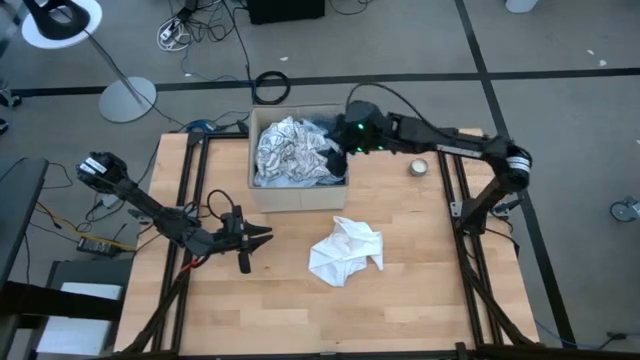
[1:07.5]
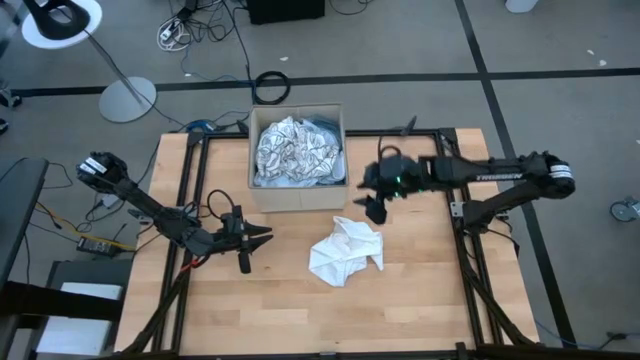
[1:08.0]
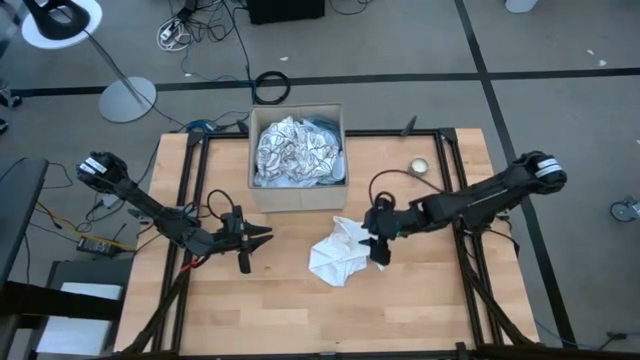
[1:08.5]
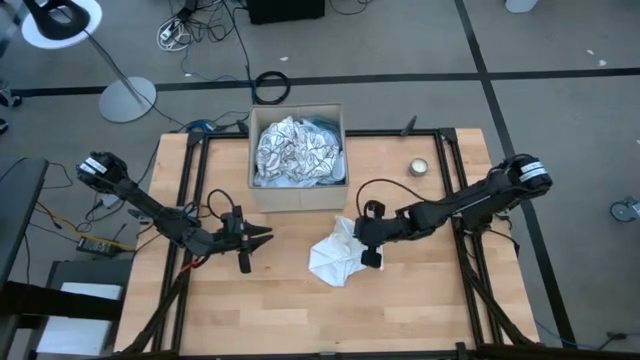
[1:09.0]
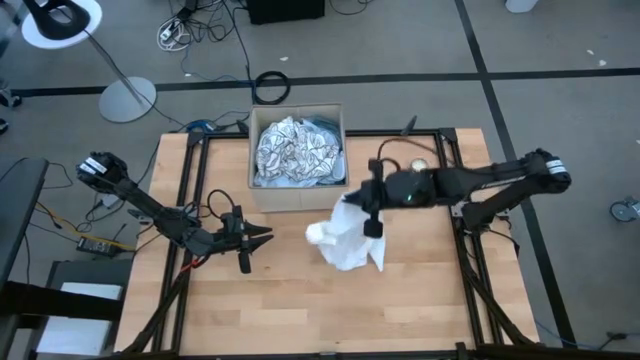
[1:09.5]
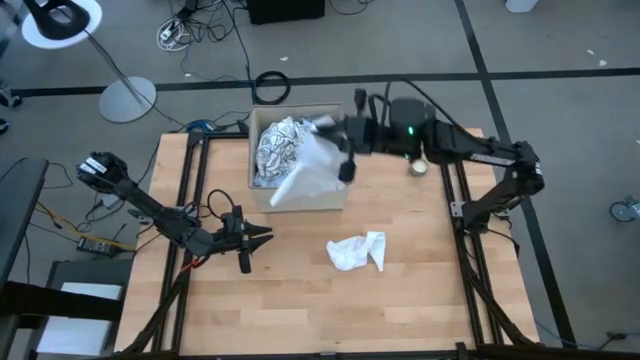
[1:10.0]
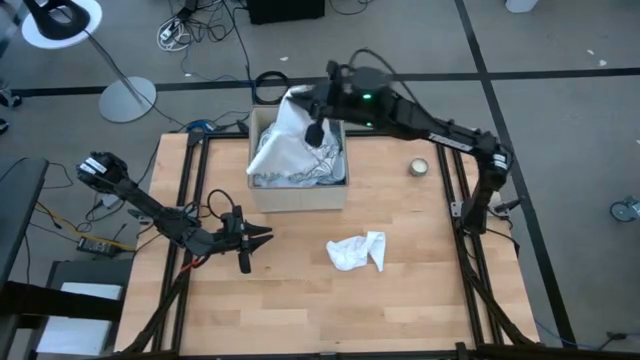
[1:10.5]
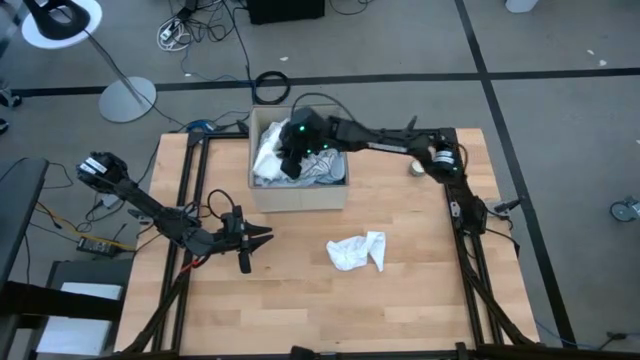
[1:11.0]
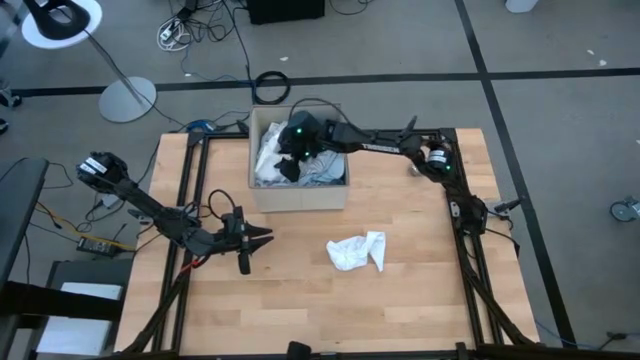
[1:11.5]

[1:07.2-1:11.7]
Task: Sort clothes
Put the white shorts into the laundry organizer

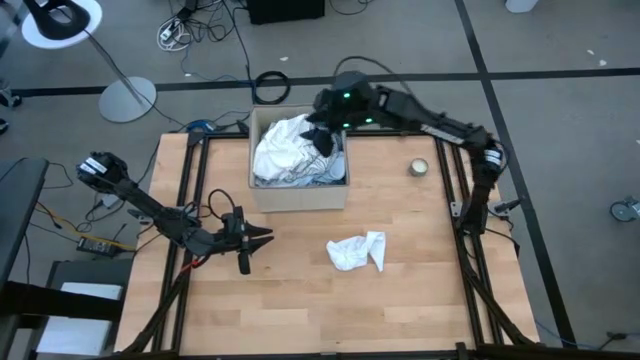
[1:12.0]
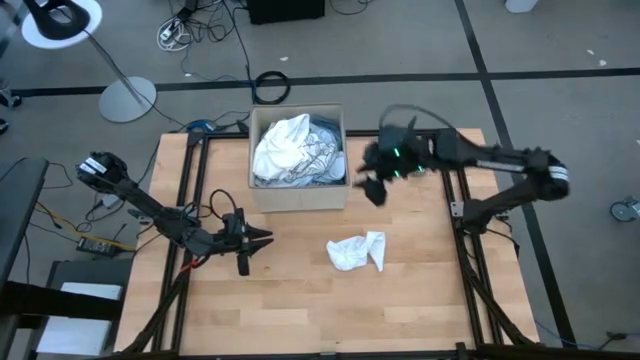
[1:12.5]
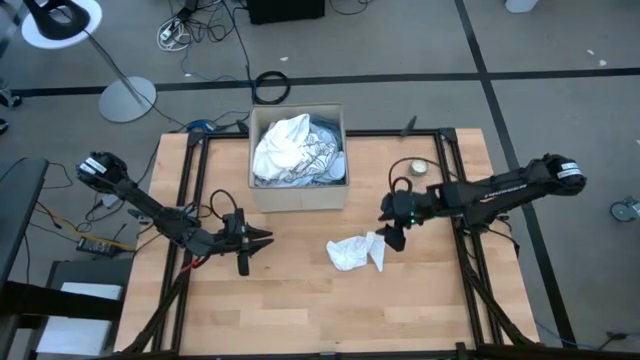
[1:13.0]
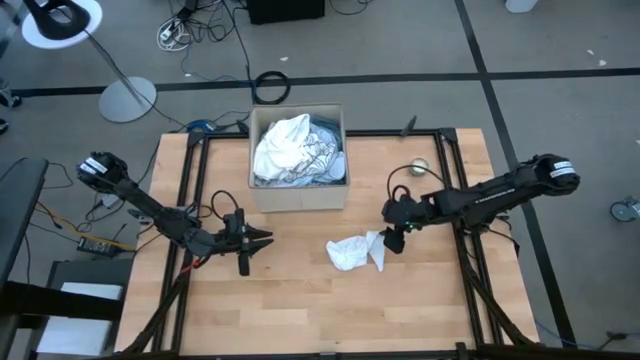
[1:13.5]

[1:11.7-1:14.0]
Put the right white sock into the laundry organizer

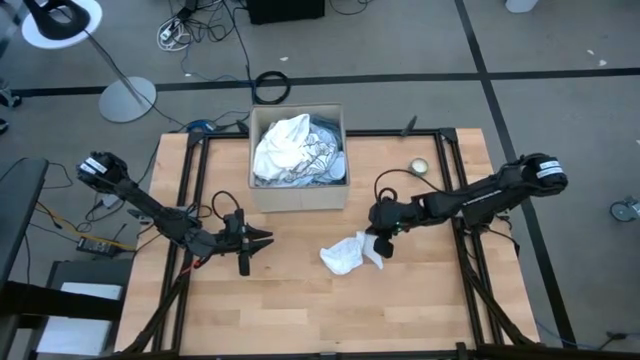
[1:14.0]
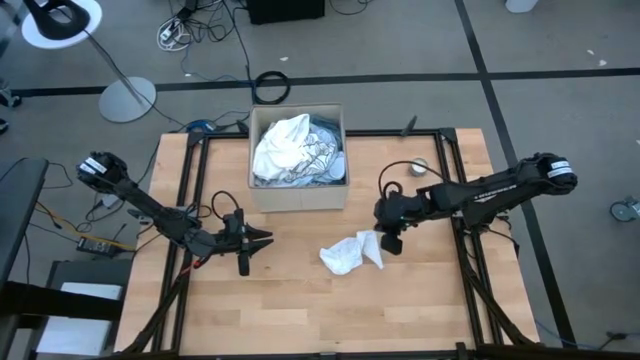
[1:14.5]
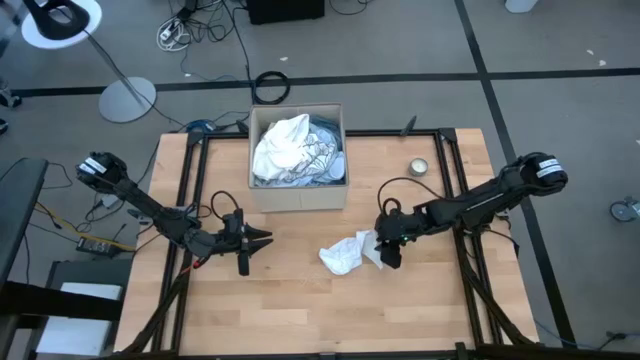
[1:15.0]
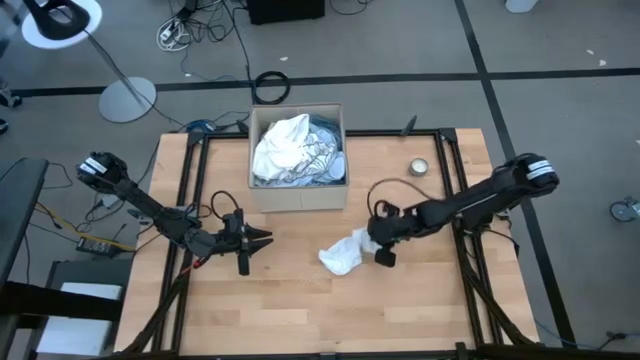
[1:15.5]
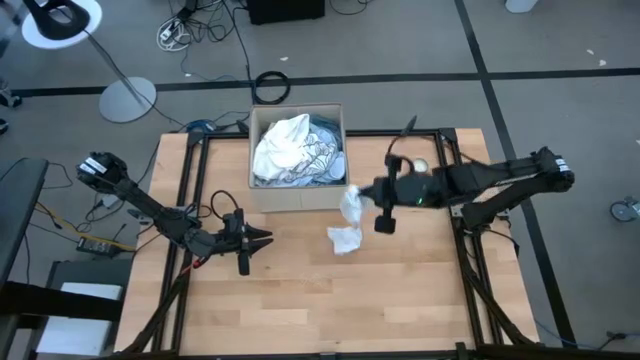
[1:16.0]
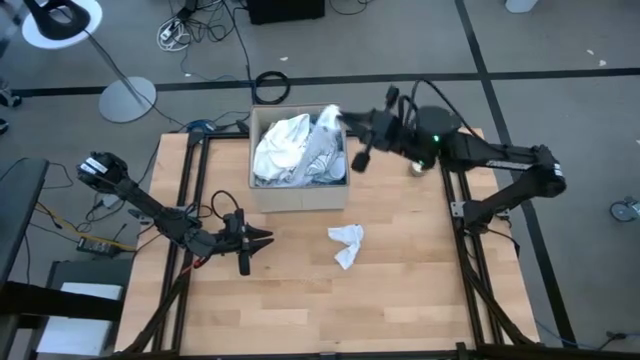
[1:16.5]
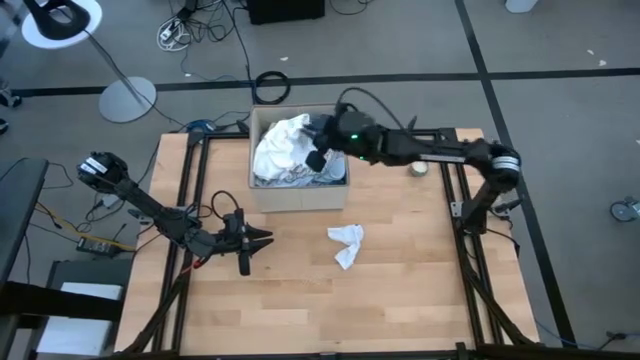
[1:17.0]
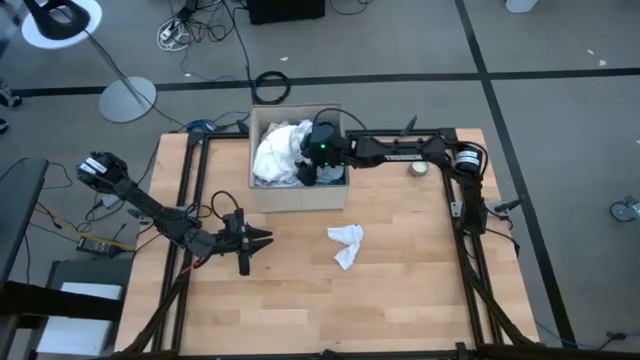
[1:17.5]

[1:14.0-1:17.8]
Put the white sock into the laundry organizer

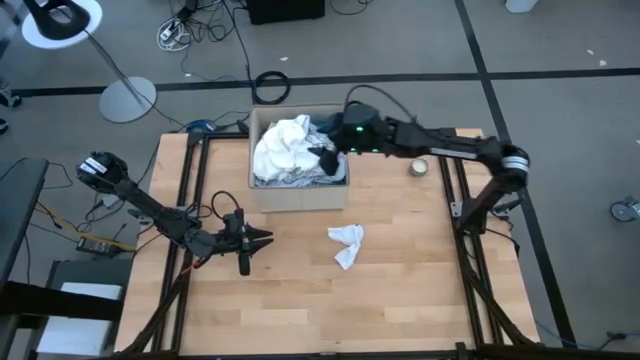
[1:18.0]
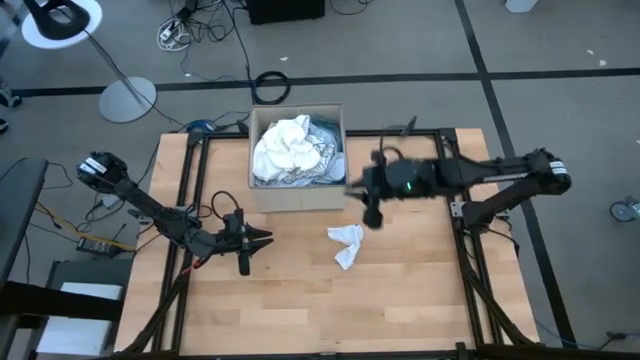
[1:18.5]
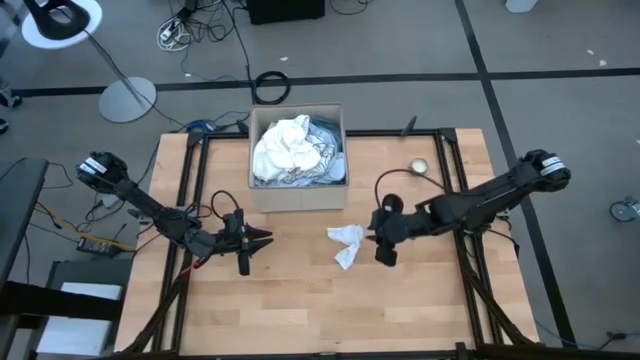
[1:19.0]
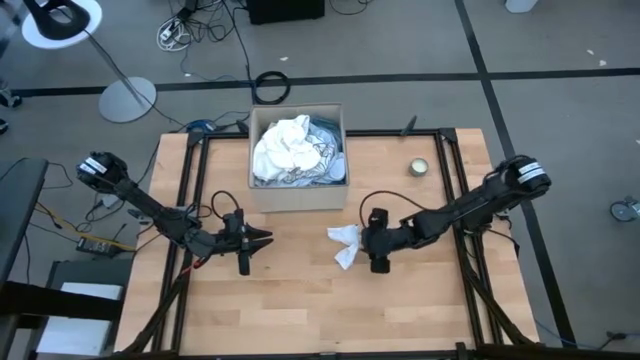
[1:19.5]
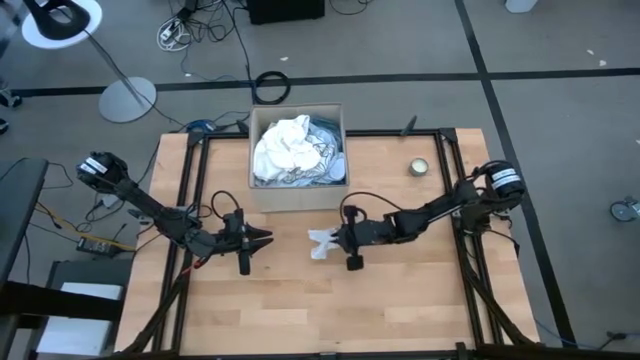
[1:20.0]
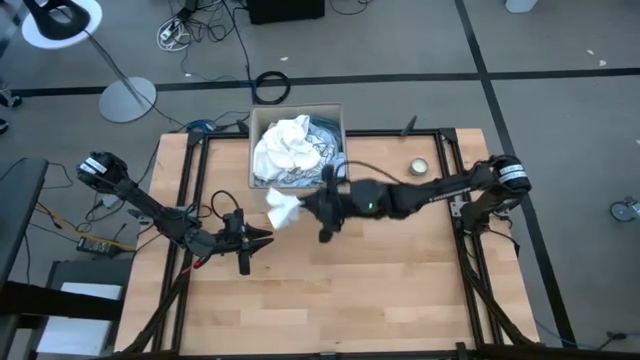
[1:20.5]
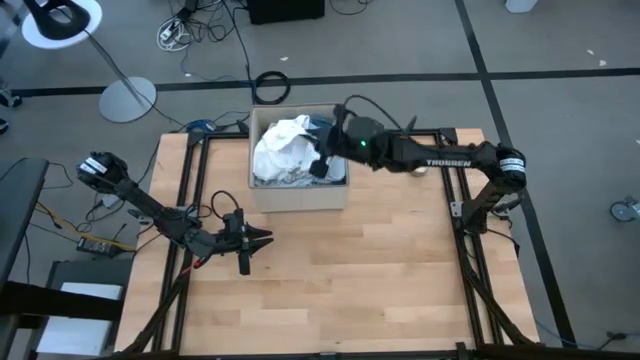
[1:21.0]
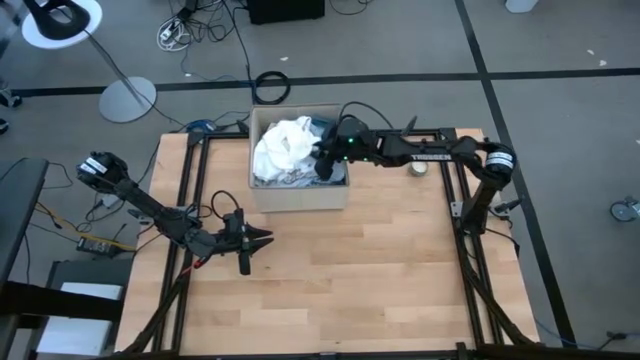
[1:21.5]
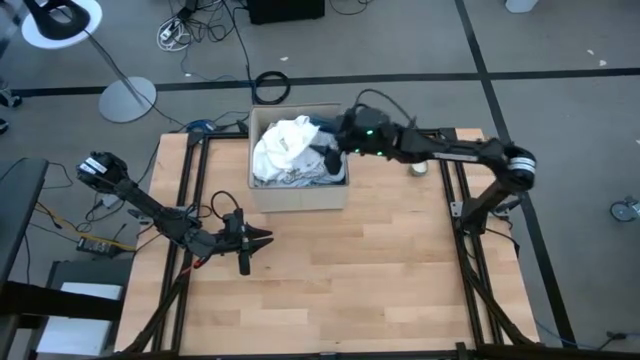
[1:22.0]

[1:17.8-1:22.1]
Put the white sock into the laundry organizer

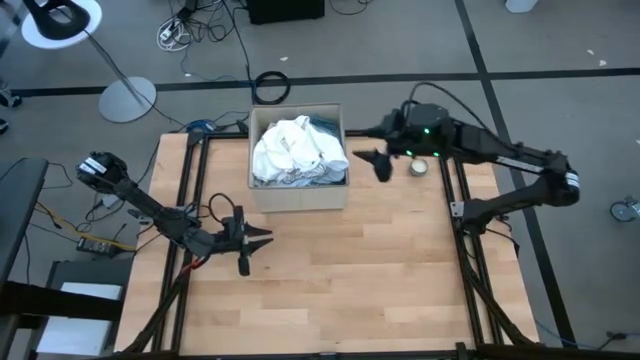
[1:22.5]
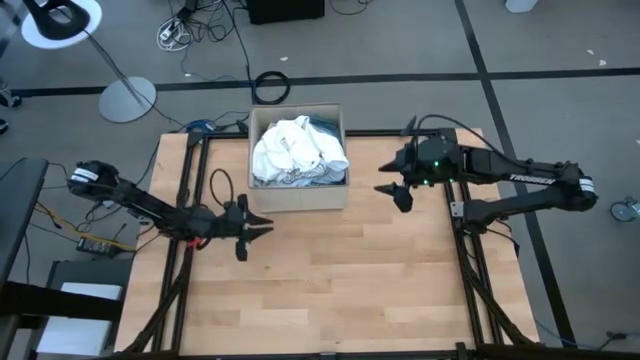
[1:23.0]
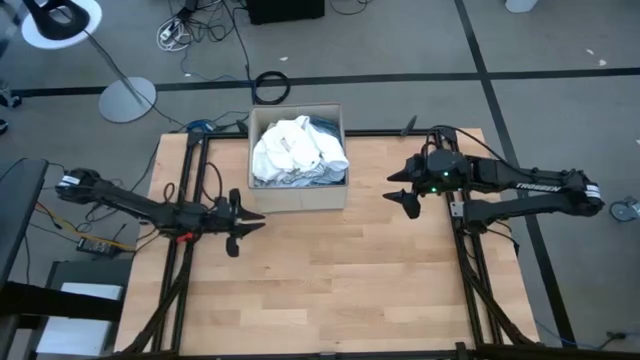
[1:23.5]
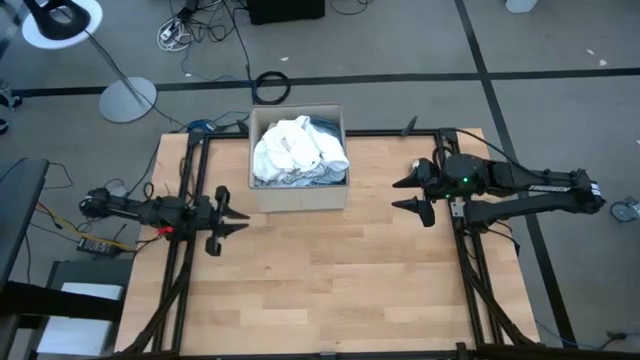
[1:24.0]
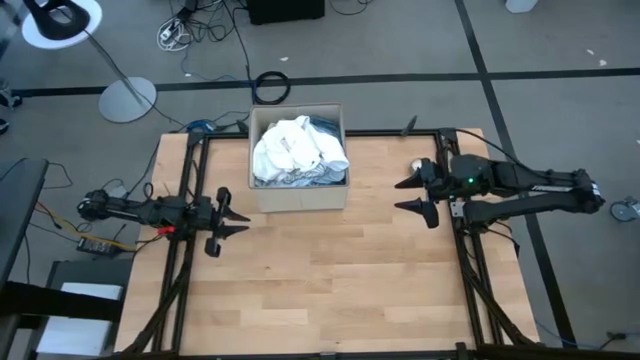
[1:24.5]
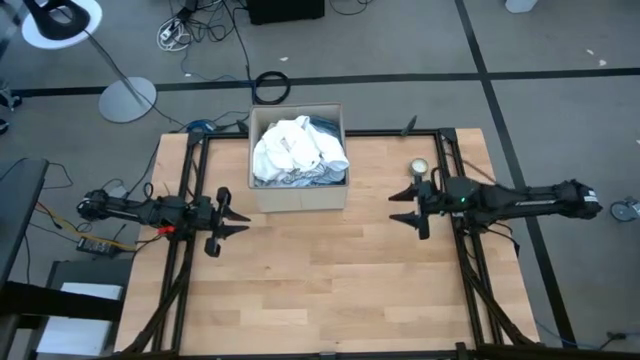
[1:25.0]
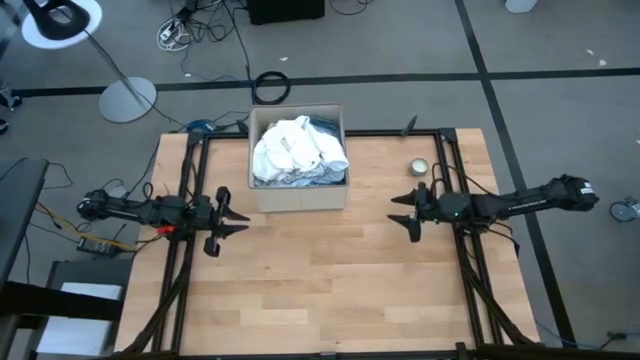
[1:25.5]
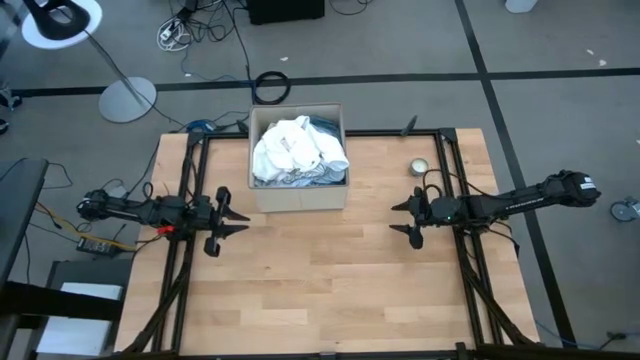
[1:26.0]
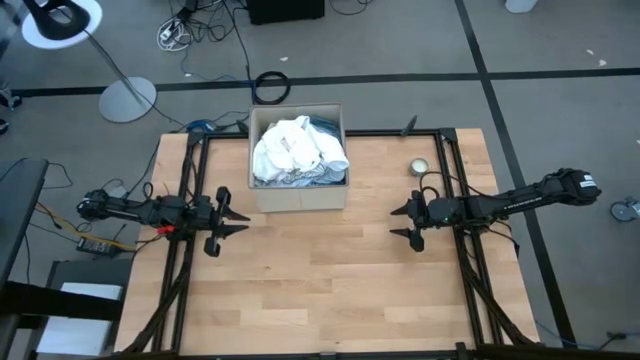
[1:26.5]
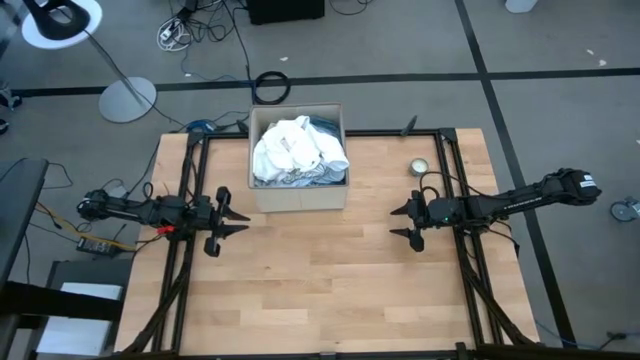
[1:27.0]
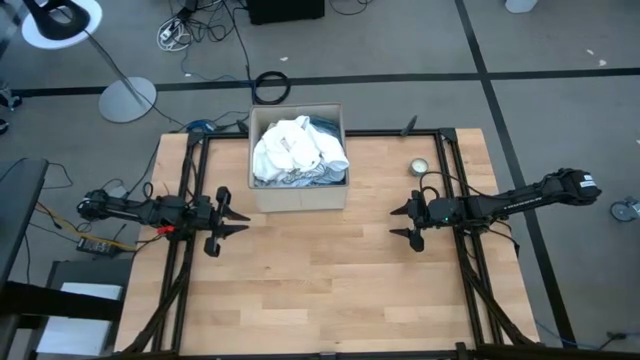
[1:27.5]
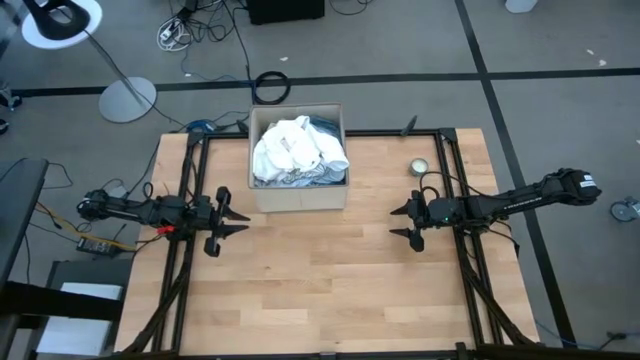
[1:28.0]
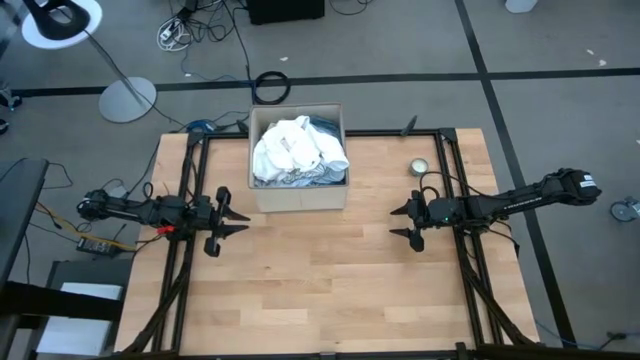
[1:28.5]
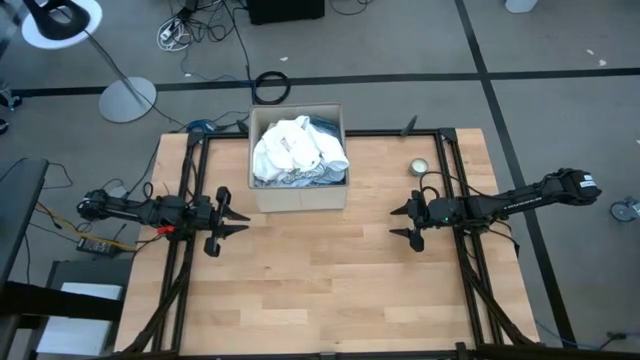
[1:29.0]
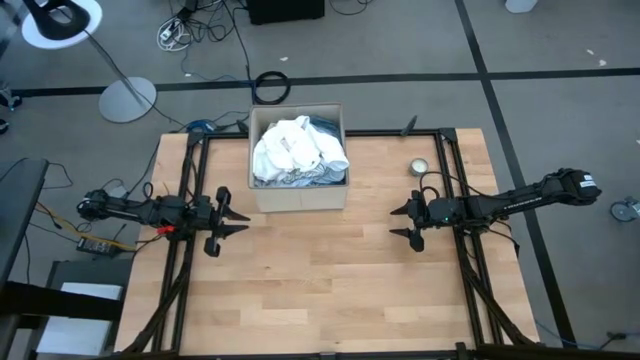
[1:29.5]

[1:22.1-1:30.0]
Return to Home Position
